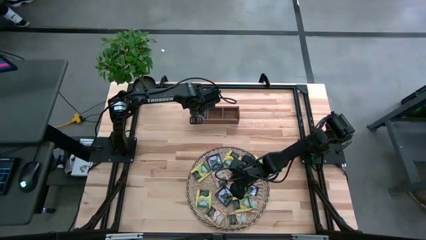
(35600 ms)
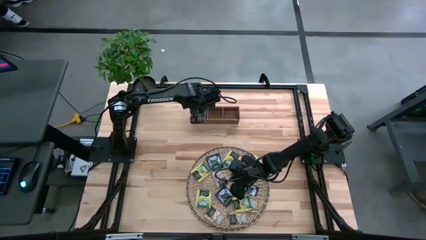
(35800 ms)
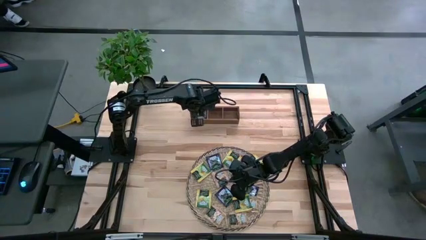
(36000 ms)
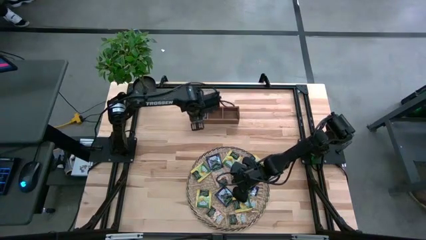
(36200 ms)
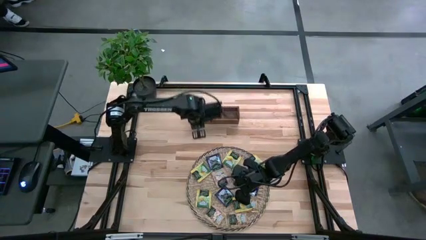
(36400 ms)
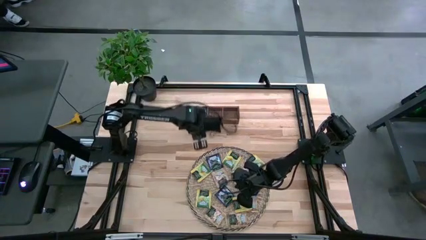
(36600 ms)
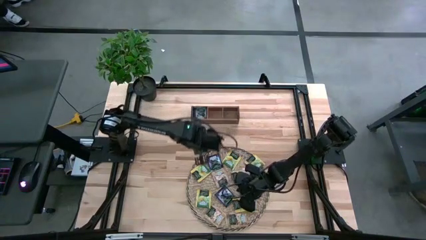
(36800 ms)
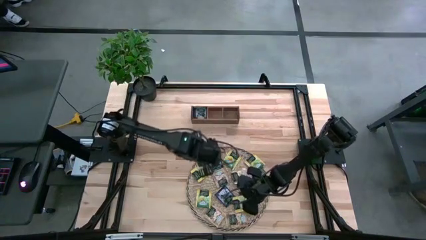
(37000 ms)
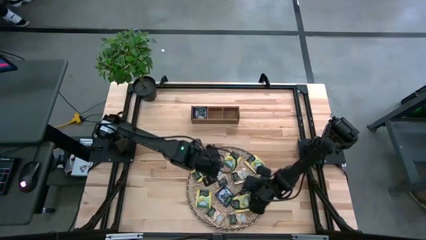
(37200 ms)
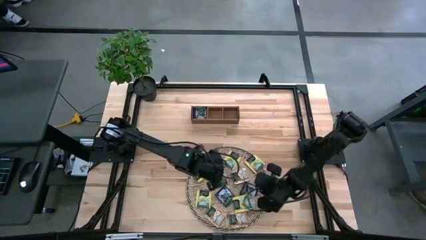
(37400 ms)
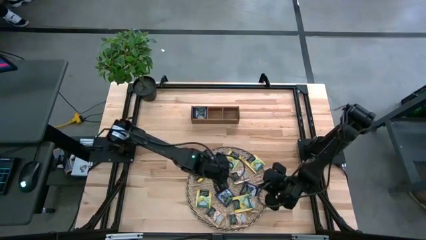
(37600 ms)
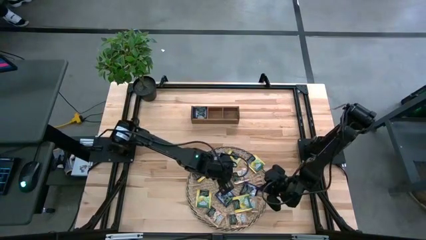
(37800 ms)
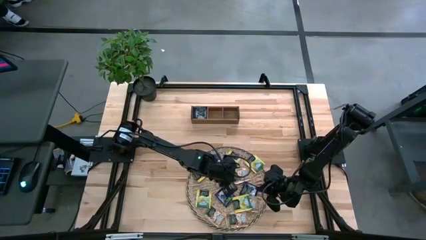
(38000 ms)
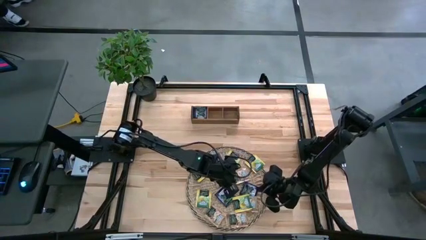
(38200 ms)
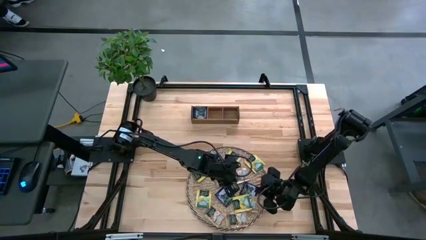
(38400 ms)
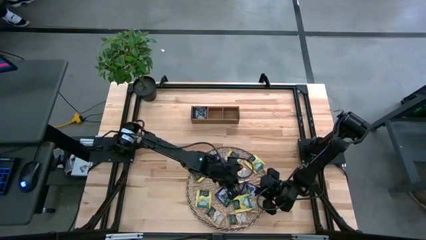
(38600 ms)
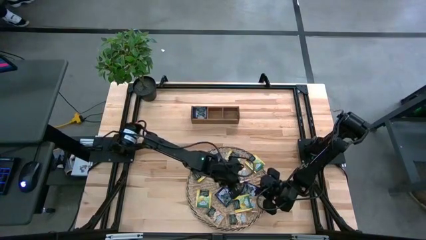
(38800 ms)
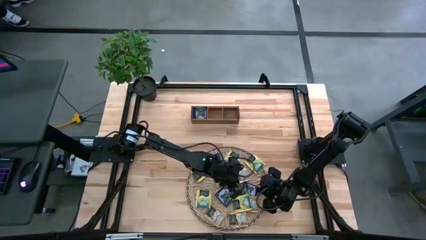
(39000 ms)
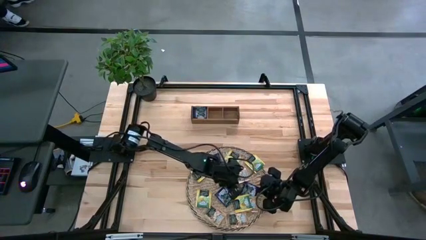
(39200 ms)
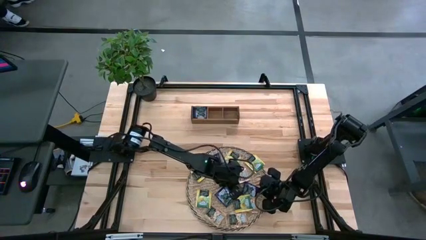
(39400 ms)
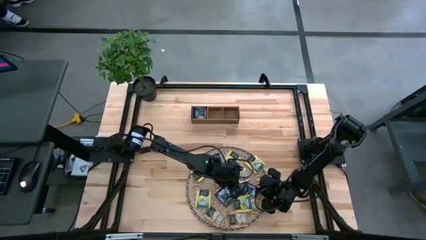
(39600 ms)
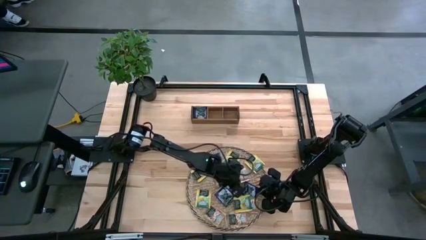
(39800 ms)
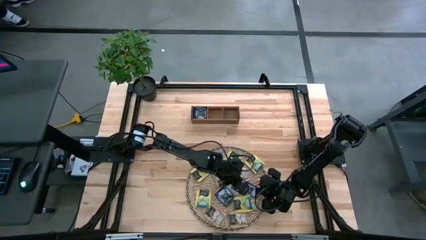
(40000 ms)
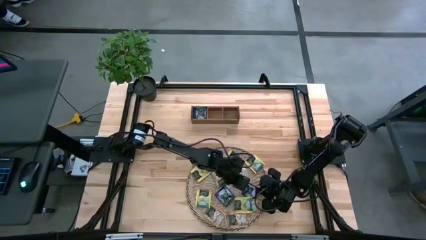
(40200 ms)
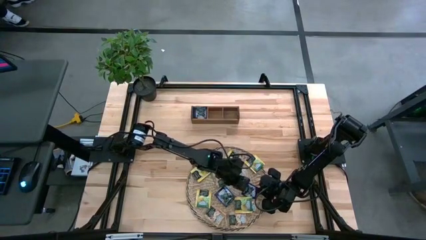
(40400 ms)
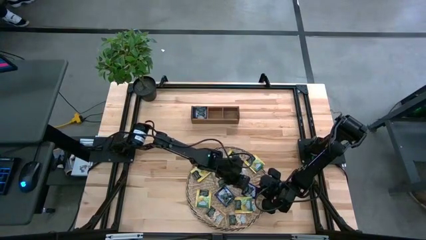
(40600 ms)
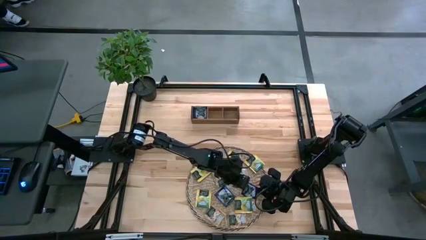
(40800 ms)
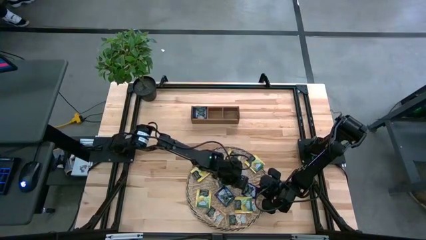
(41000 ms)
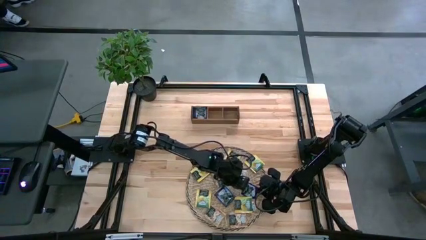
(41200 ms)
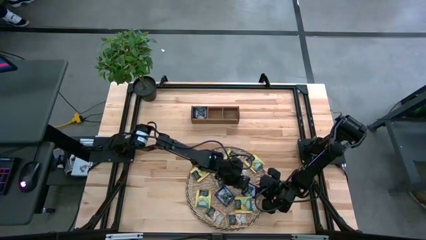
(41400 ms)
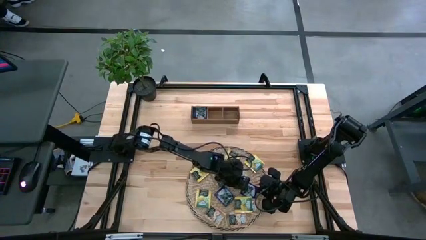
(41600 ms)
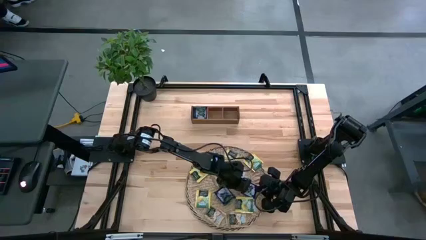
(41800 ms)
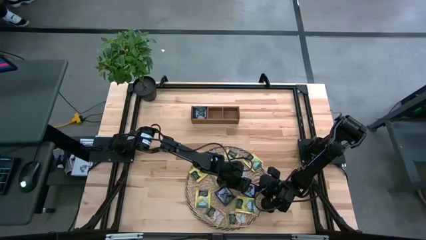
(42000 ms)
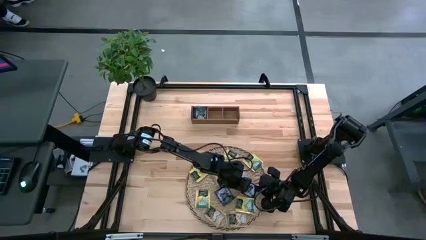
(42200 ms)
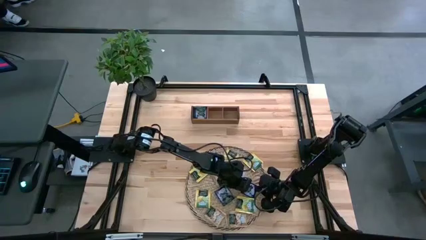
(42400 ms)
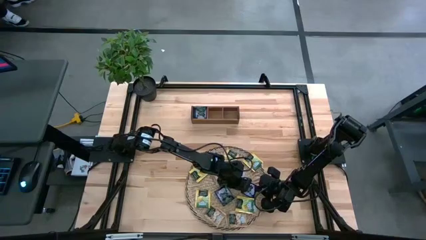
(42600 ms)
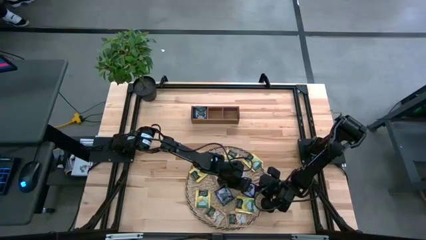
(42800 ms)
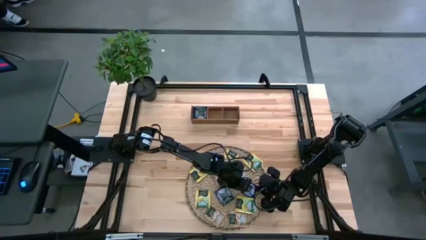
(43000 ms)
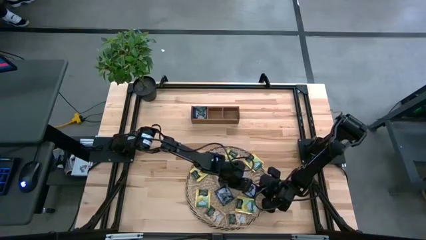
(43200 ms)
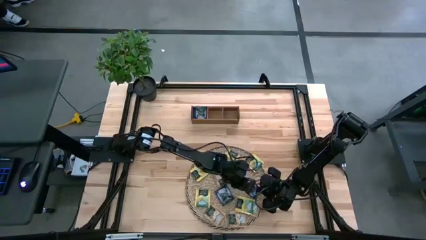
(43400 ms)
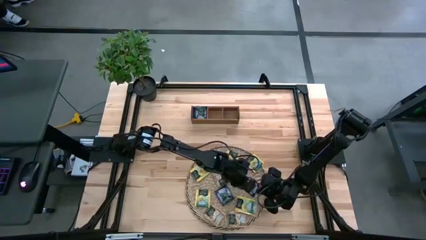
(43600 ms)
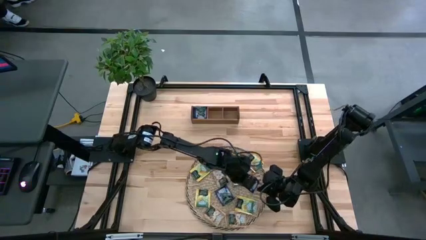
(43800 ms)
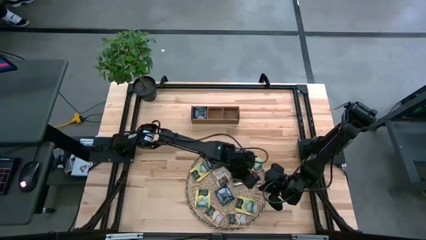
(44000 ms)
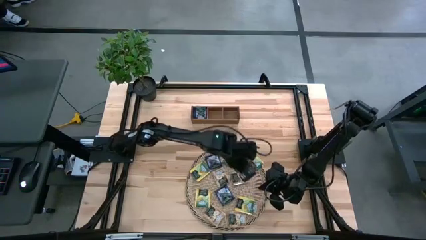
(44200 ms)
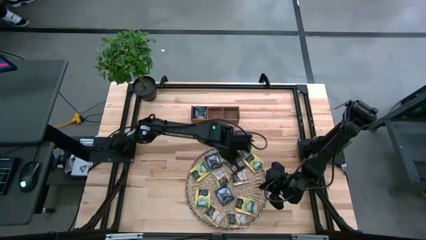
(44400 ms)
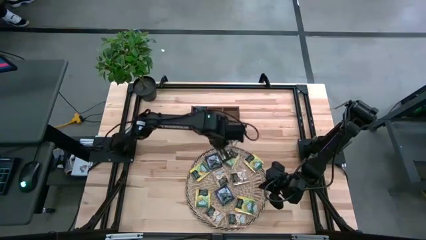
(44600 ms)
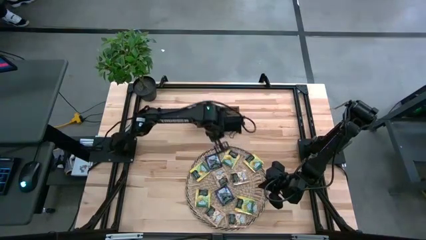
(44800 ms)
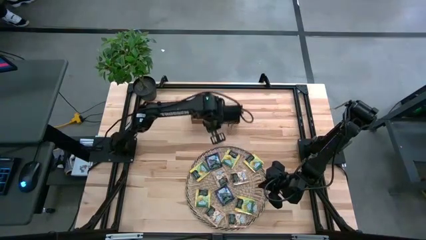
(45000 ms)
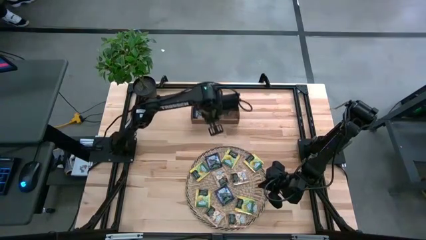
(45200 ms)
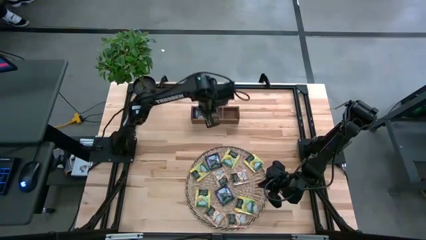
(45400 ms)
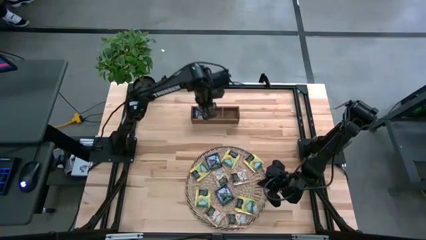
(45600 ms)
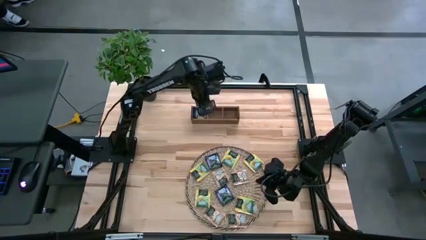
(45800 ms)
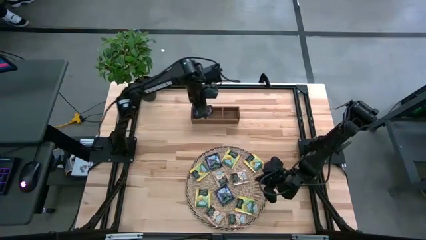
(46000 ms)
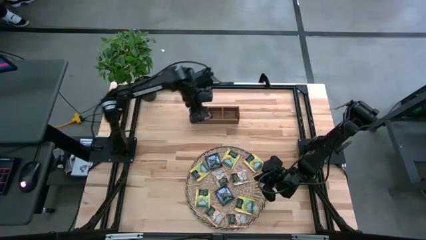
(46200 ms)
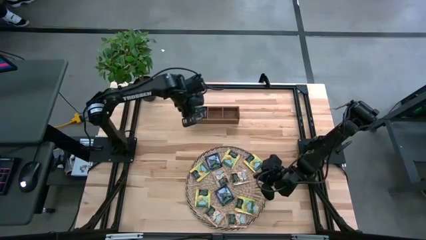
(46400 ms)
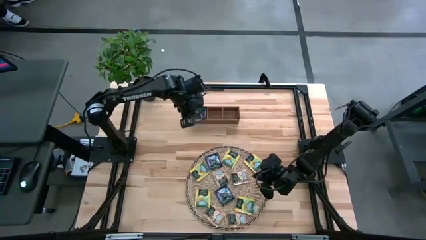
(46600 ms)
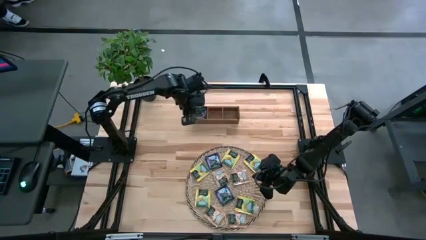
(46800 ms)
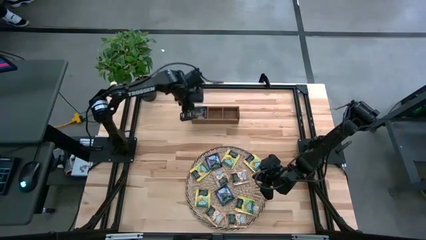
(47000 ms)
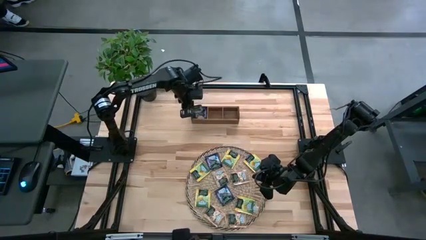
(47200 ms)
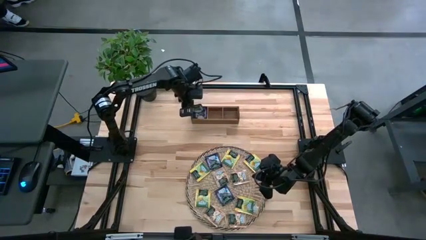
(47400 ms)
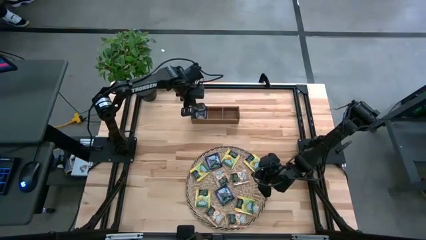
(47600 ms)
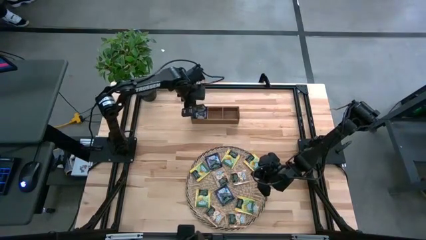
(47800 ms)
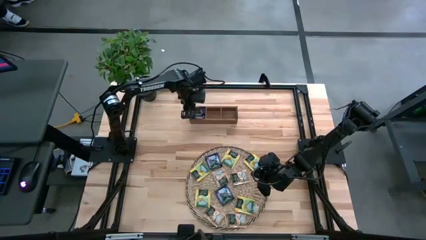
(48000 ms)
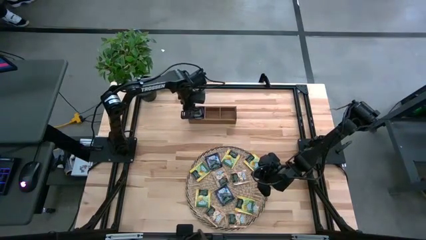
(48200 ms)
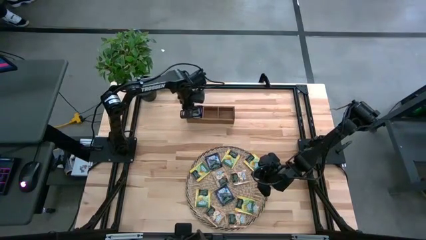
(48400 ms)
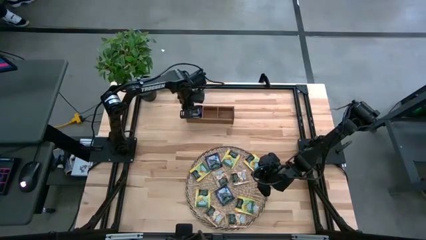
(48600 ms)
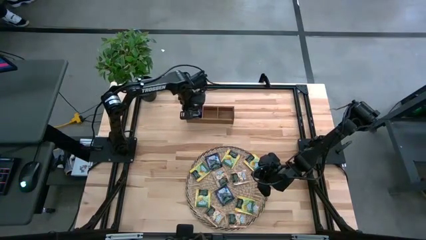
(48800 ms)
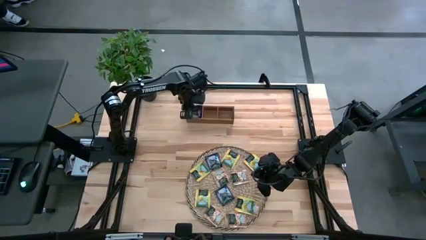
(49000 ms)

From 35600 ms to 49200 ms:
Task: Pick & Place Tea
Put the purple tea bag in the left section of the wooden organizer

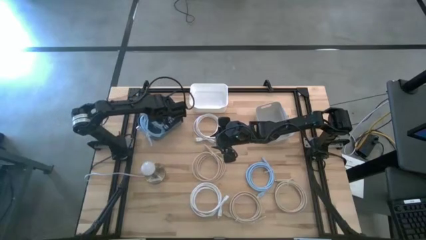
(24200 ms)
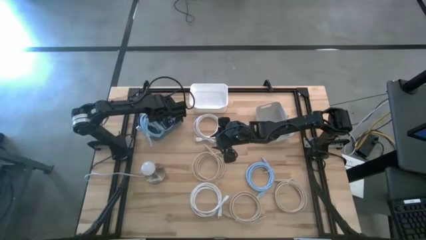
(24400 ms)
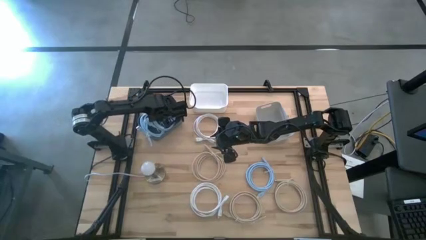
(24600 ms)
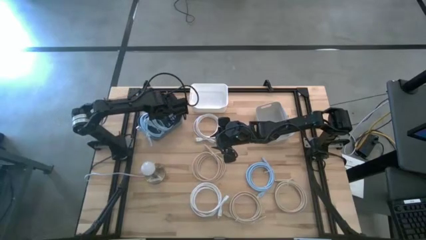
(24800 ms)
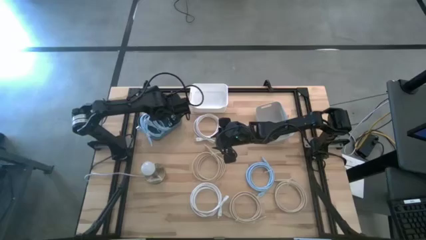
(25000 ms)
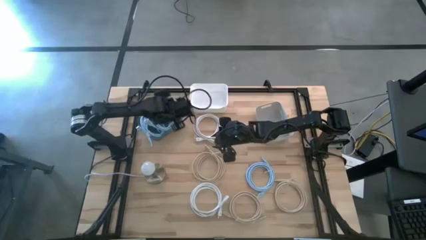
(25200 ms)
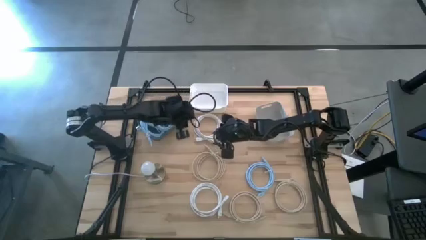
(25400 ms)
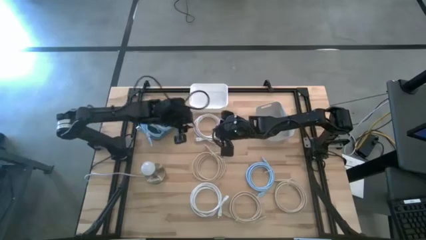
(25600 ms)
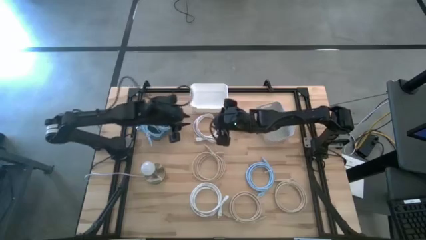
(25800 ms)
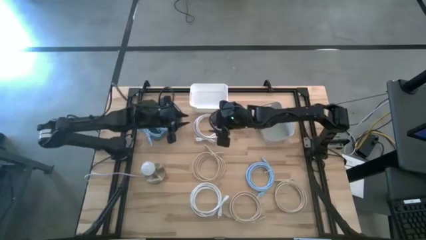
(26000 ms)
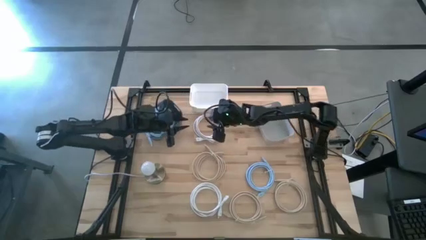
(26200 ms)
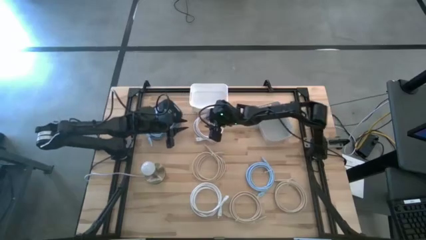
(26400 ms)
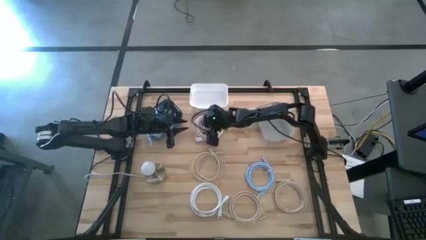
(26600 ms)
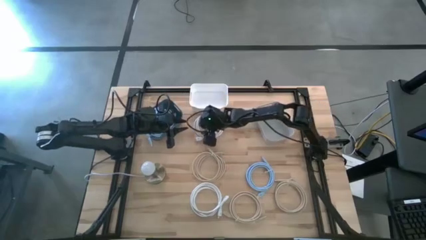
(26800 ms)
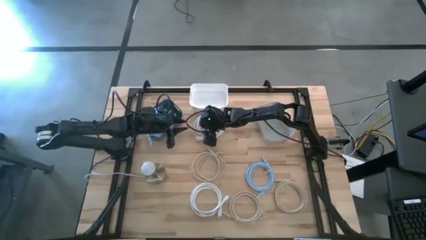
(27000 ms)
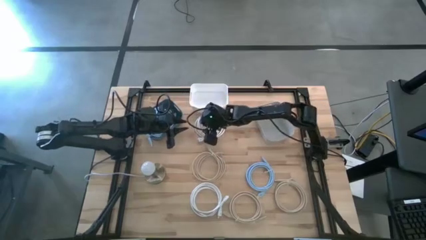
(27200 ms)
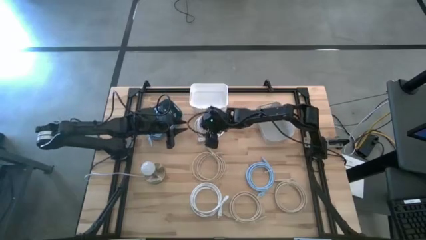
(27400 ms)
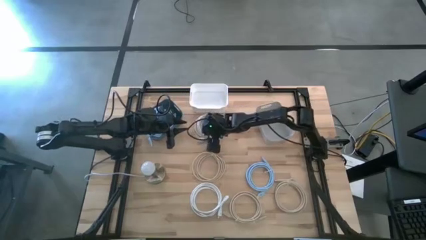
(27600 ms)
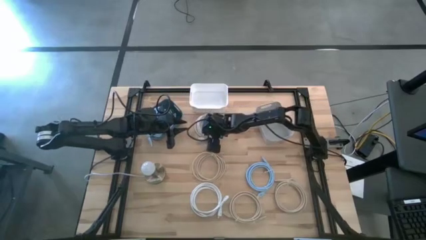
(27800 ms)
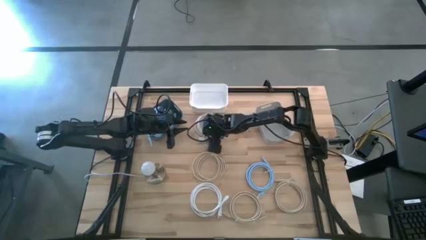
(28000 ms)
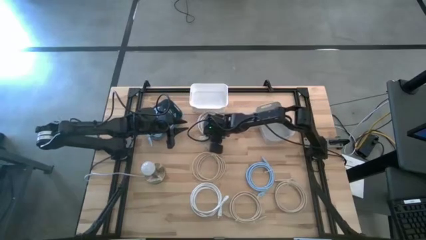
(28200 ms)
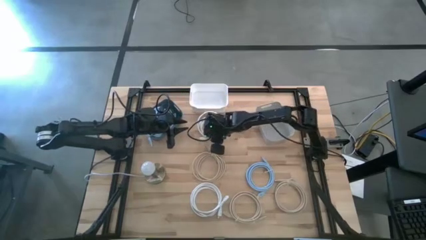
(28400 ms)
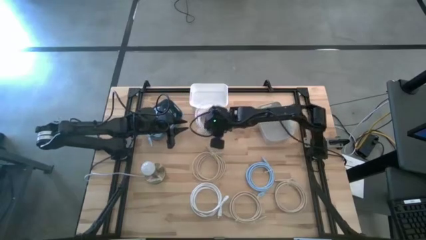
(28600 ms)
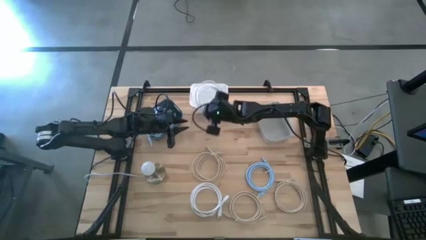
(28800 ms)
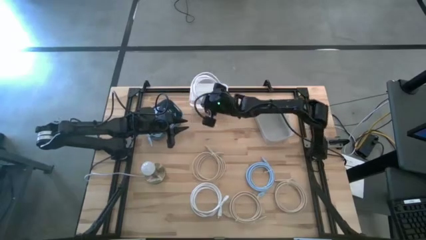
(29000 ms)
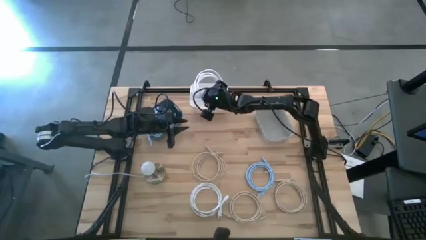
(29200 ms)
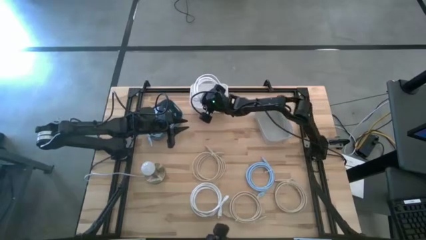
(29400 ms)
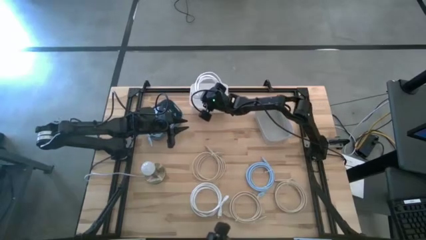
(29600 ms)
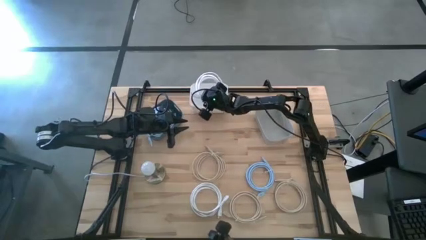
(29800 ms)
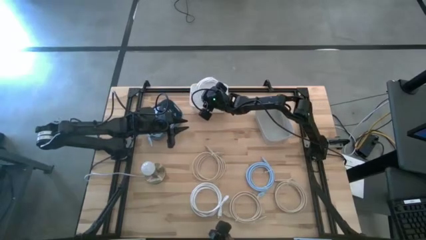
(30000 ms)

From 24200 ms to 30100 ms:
Task: Sort HDMI cables
Put the top white hdmi cable into the white bin
